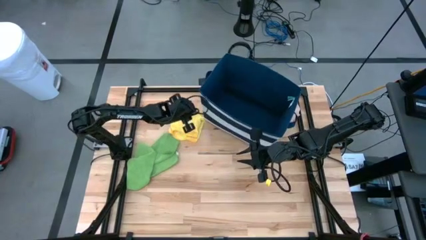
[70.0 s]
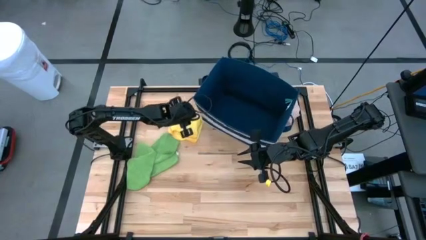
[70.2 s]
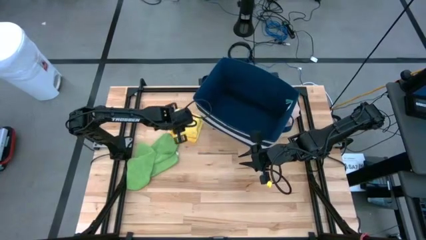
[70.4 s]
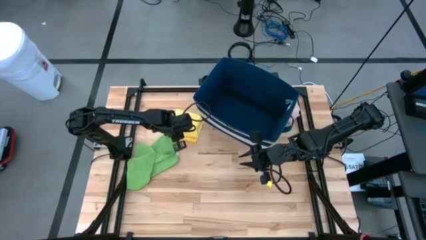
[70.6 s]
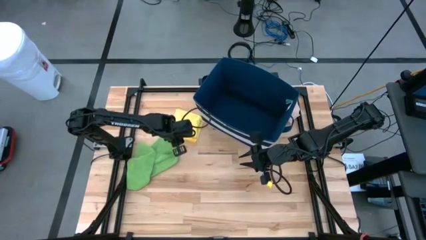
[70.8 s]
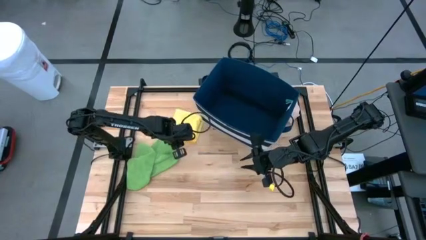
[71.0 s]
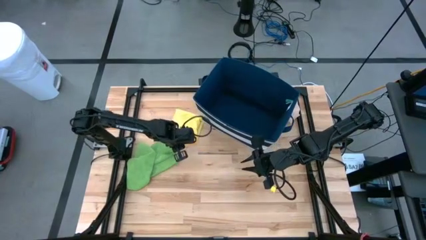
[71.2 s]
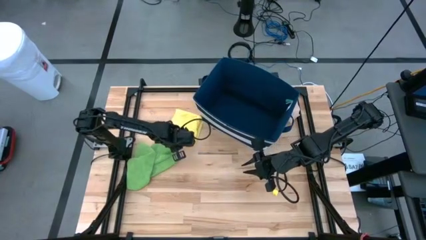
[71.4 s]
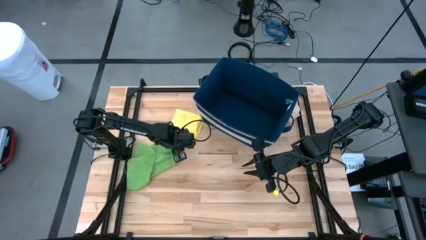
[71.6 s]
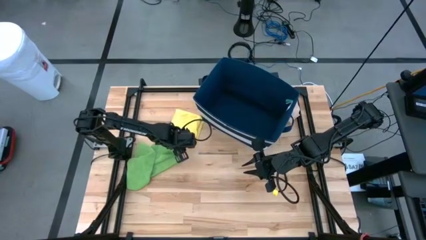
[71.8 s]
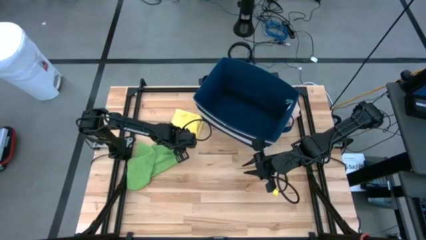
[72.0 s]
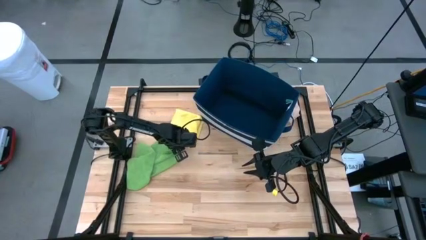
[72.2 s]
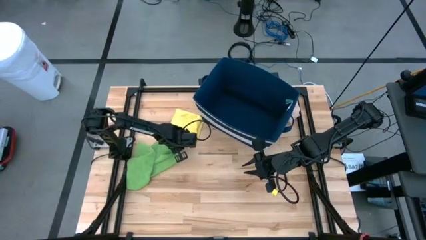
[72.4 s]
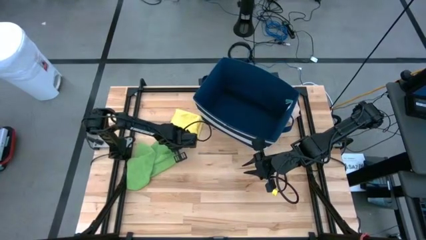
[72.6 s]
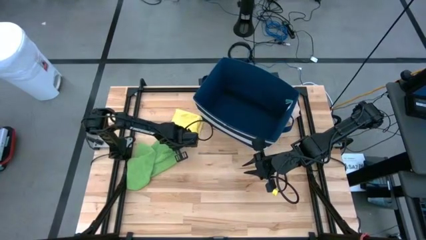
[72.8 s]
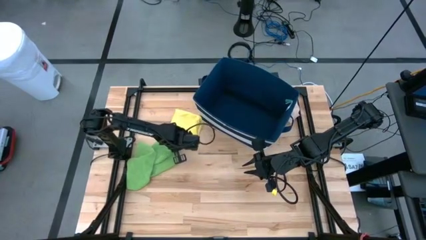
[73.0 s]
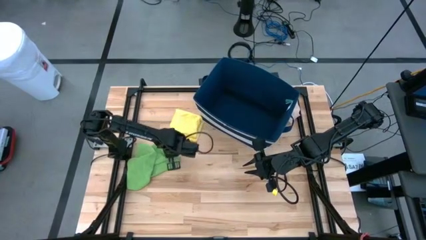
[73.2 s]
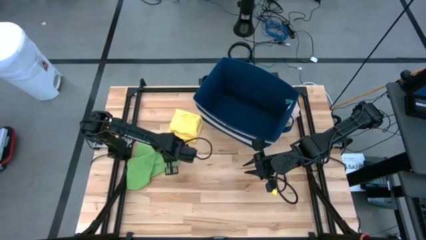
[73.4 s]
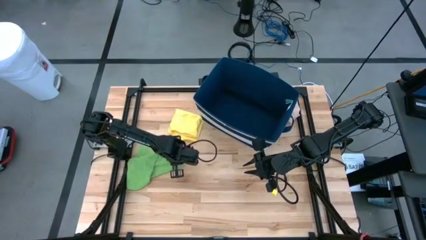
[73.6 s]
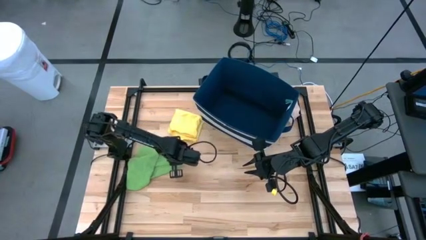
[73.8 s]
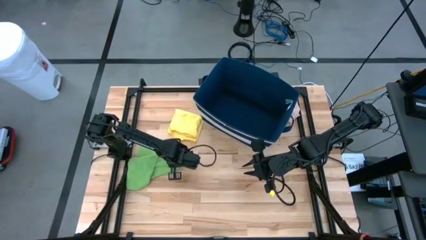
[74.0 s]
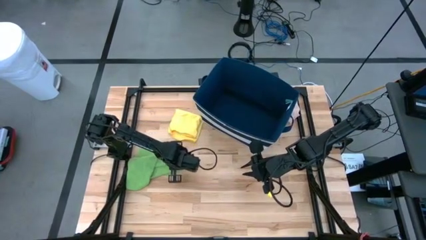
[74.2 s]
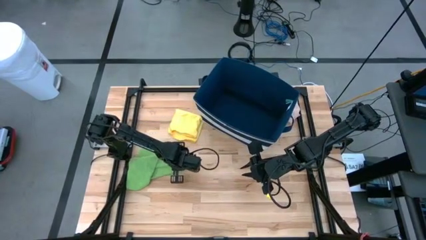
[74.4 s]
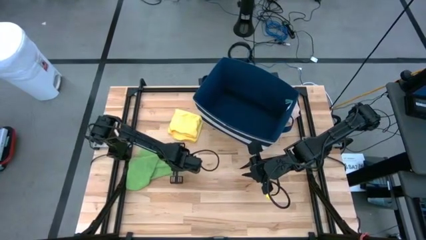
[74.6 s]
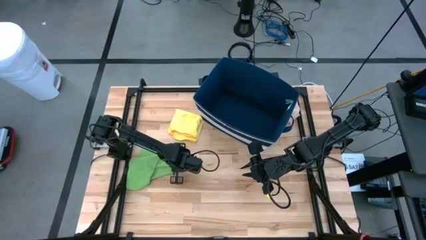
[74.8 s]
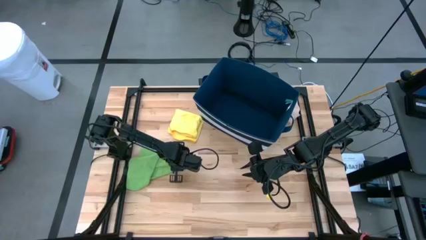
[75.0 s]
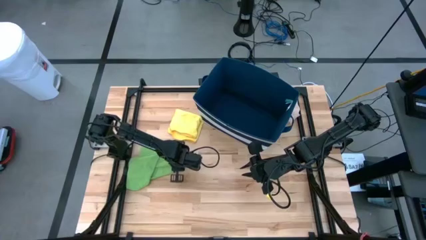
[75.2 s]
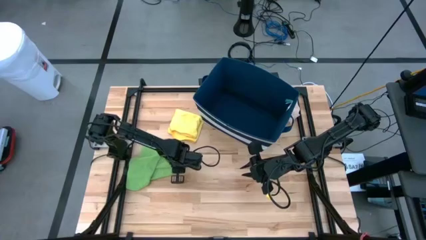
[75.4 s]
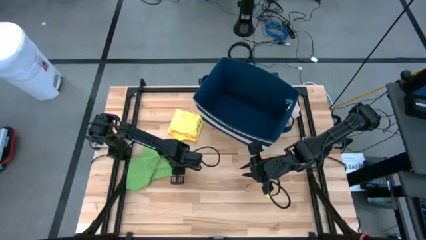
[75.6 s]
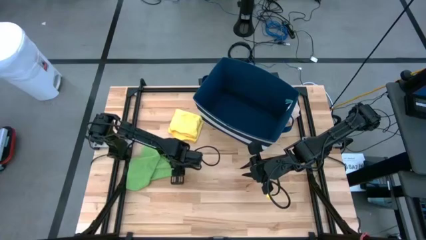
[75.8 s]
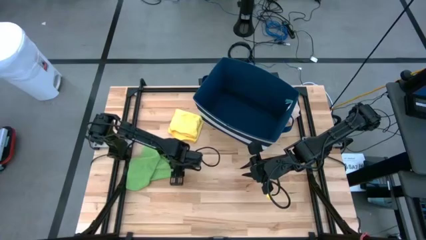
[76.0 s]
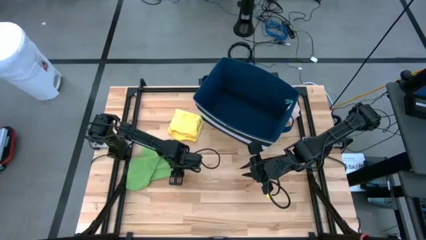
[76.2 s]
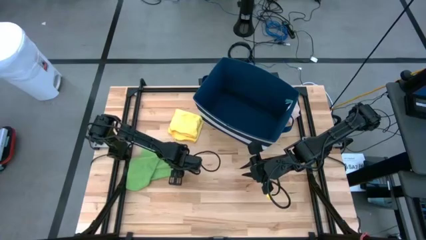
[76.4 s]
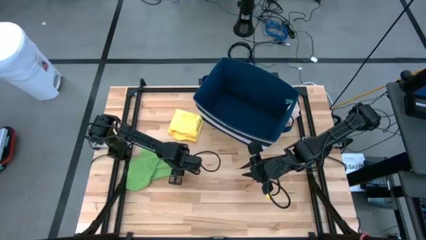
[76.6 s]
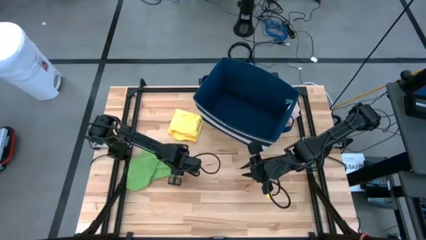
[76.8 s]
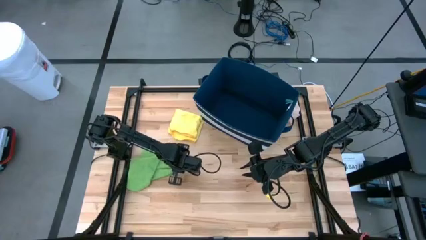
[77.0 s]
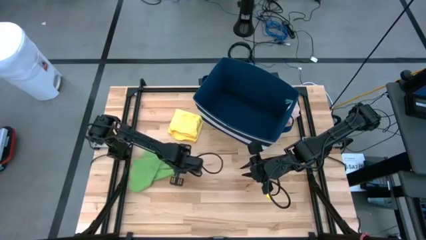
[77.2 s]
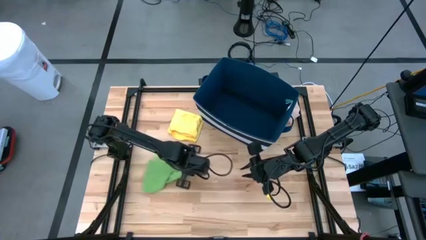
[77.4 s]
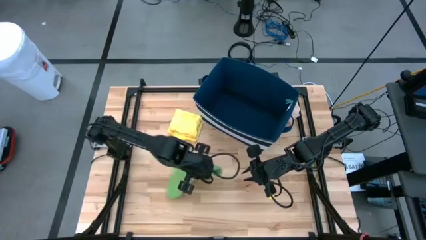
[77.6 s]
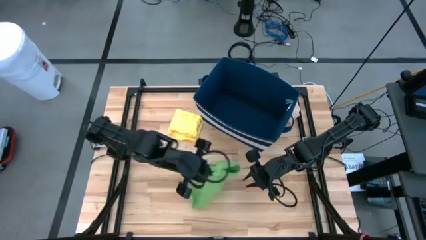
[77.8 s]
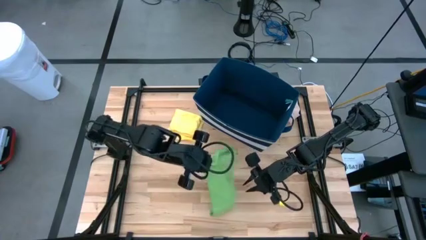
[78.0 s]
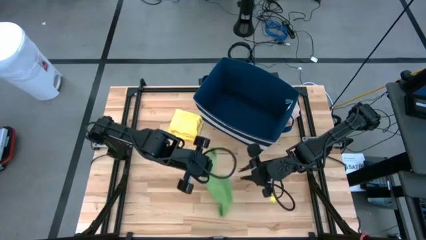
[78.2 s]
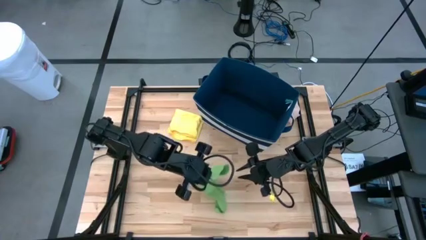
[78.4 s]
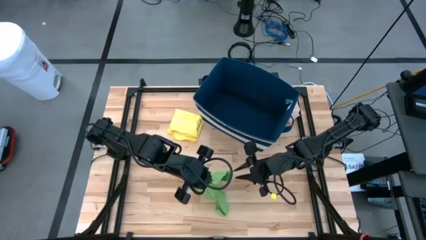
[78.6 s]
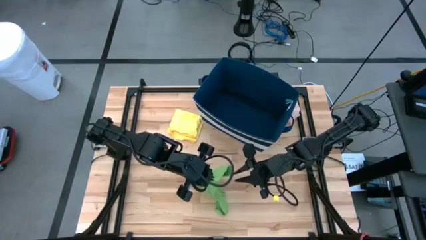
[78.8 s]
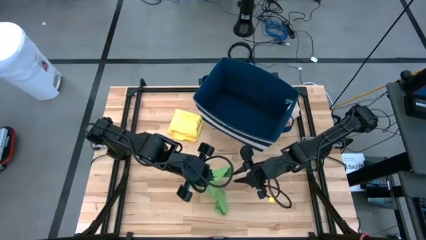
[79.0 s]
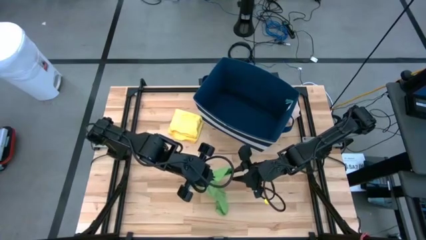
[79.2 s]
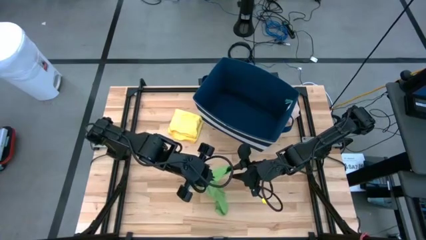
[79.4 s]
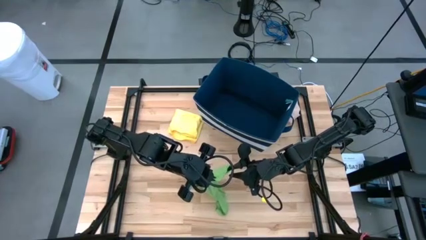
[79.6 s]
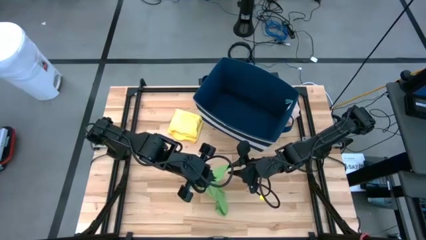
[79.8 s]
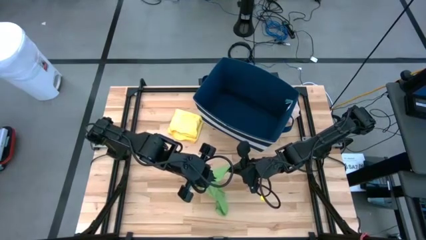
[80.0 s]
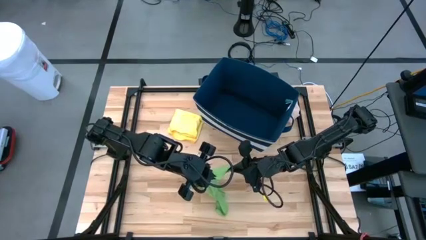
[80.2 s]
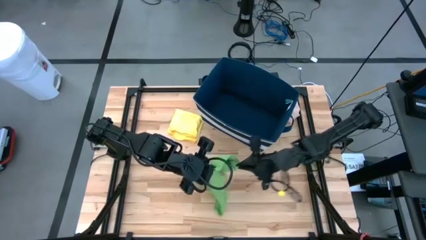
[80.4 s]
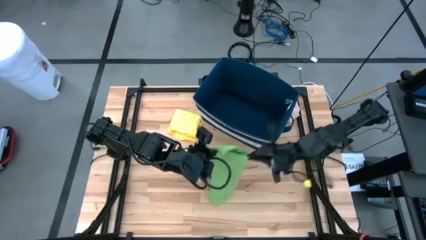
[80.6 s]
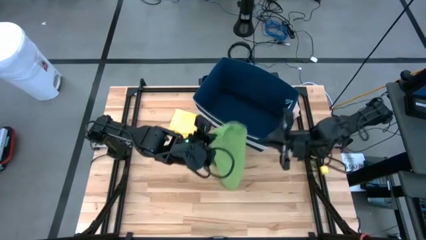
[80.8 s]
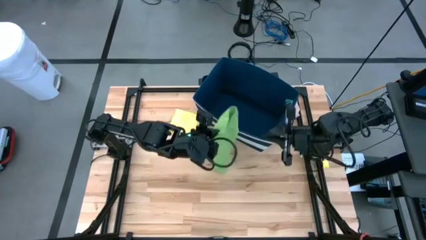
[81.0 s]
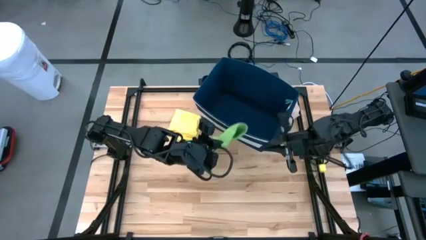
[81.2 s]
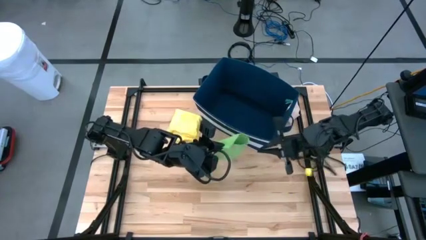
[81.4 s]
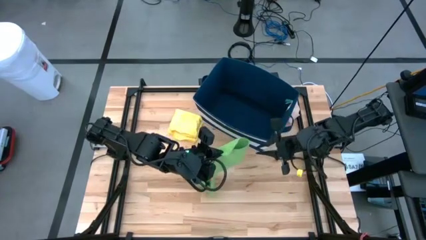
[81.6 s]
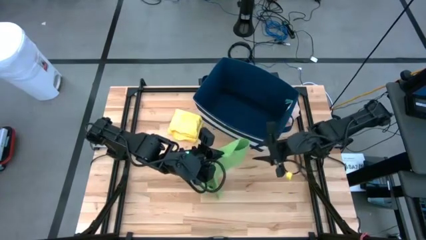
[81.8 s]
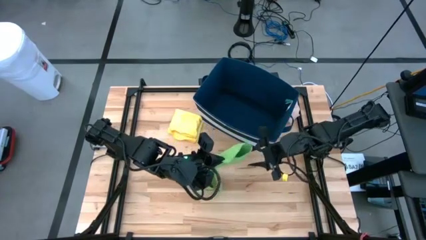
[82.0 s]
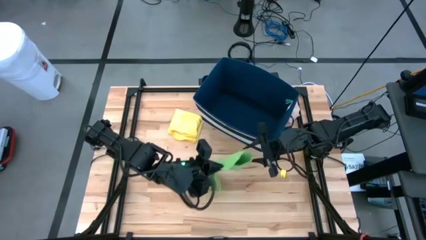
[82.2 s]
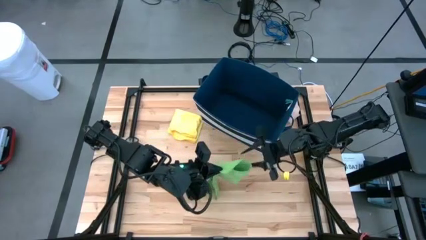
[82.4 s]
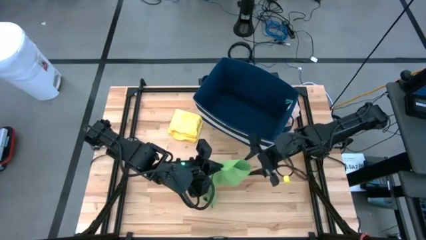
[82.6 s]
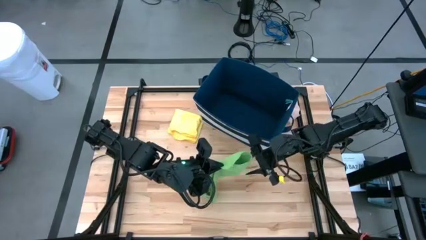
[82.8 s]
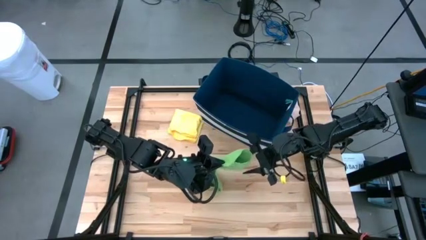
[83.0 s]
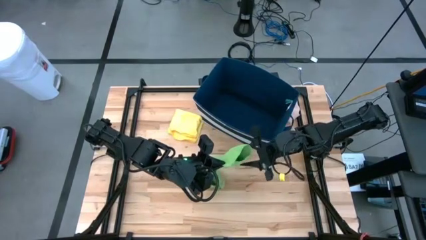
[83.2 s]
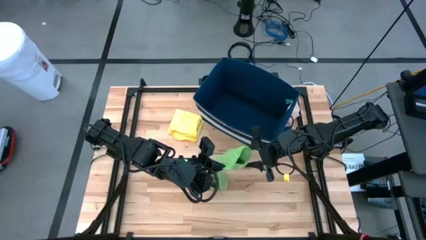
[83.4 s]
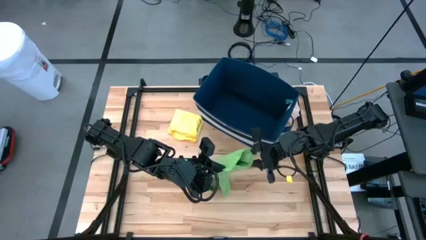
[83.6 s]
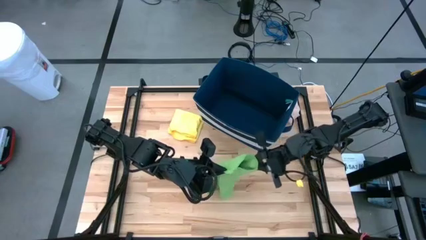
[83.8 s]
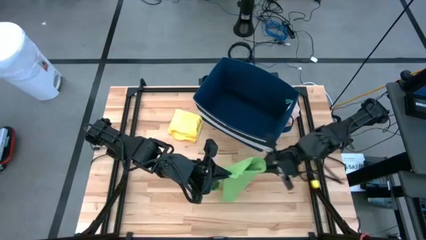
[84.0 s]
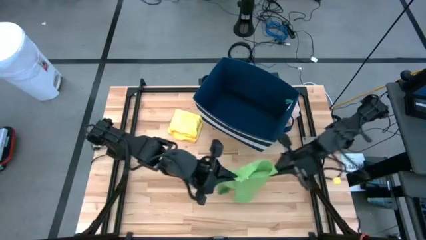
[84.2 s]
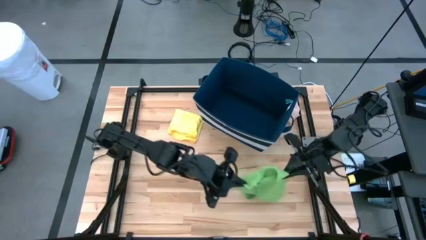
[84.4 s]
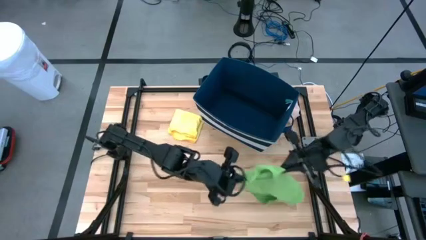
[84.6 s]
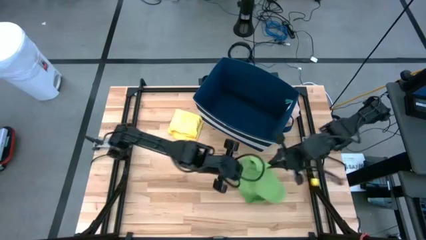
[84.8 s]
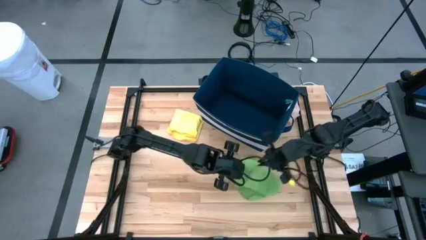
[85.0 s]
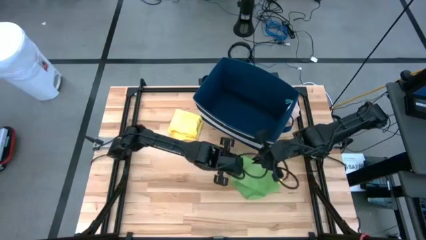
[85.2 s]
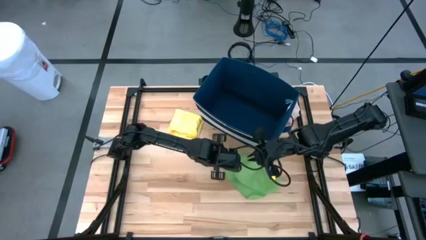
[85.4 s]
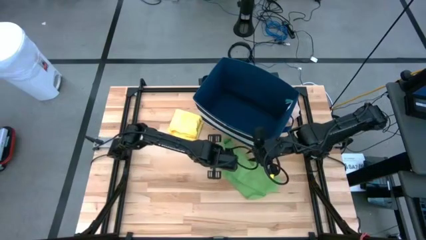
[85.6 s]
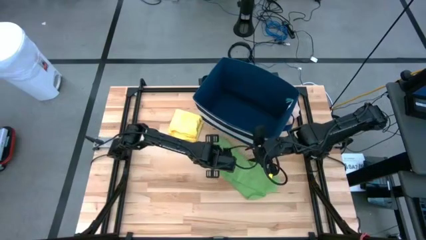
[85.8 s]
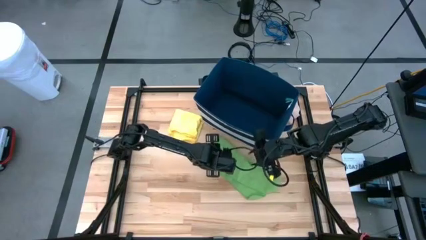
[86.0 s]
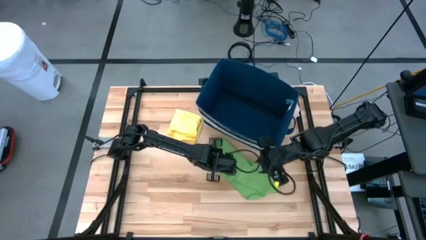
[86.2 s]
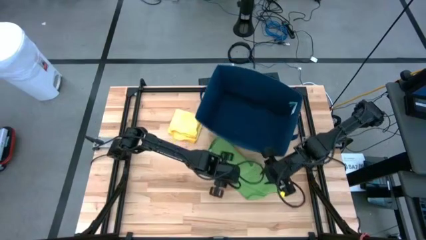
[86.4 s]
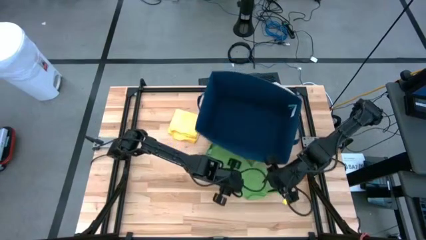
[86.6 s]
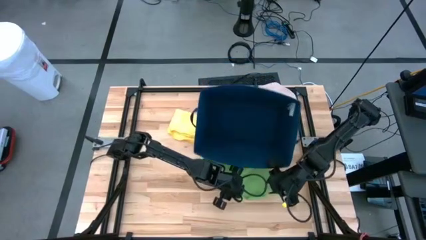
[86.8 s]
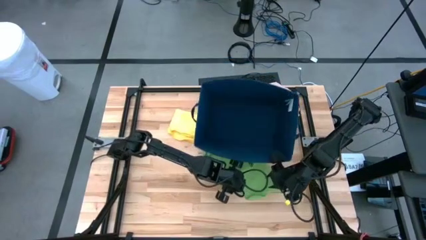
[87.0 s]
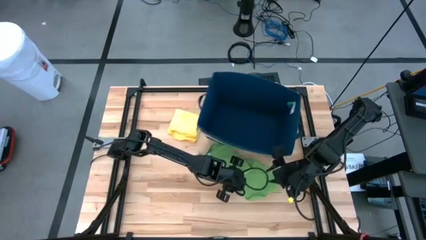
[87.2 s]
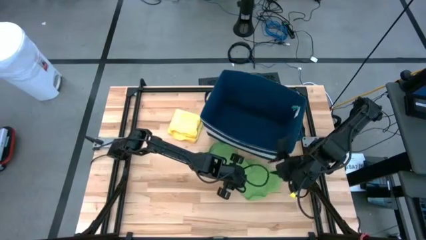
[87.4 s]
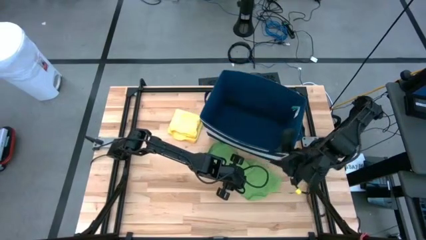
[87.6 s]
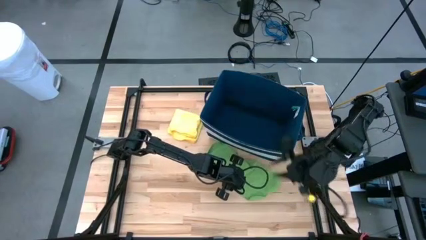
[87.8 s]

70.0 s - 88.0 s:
Task: Fold towel
Fold the green towel
